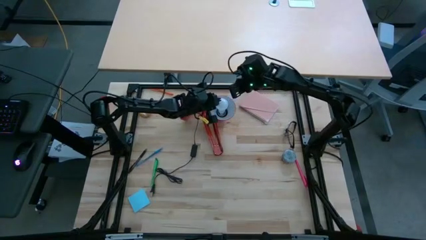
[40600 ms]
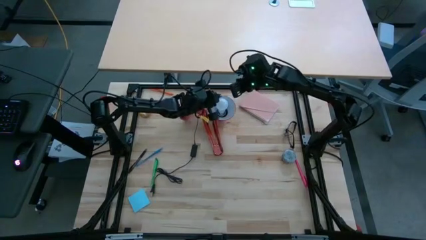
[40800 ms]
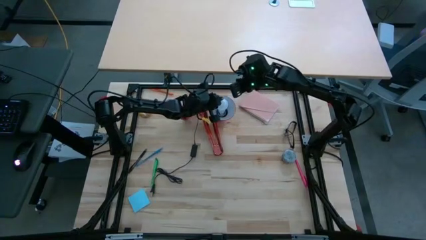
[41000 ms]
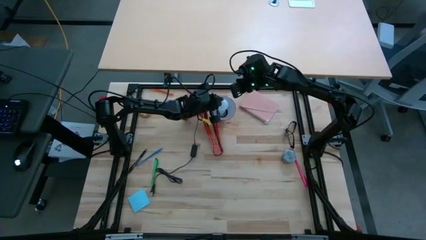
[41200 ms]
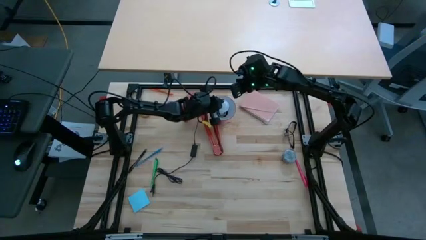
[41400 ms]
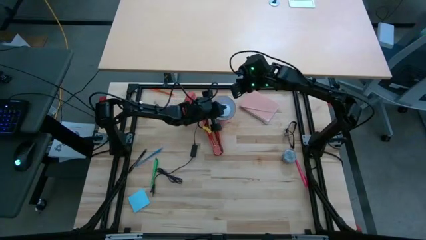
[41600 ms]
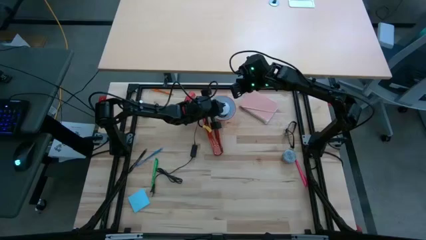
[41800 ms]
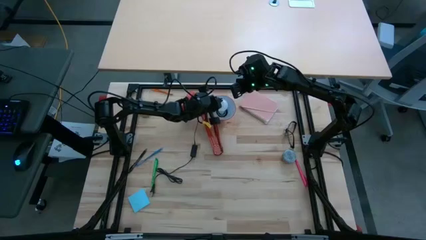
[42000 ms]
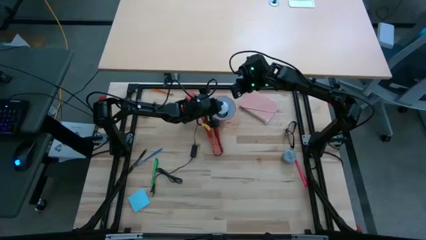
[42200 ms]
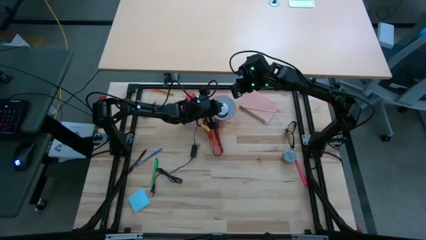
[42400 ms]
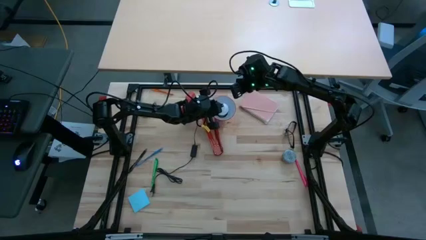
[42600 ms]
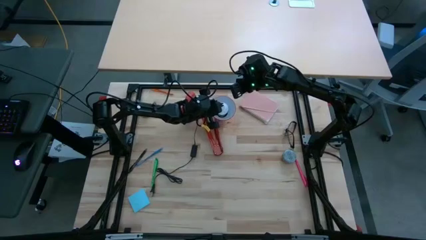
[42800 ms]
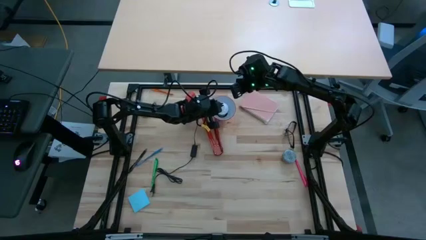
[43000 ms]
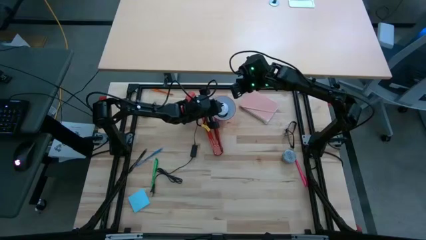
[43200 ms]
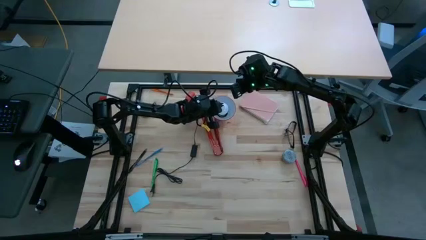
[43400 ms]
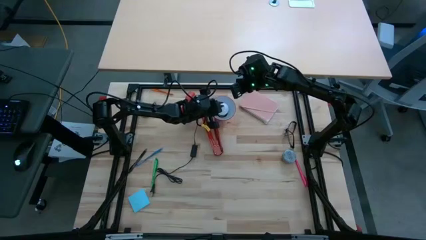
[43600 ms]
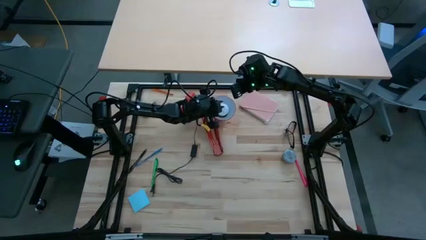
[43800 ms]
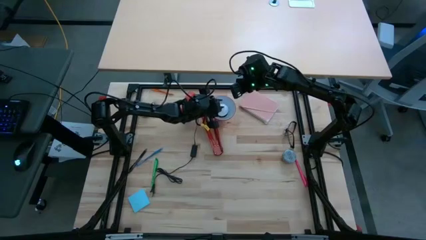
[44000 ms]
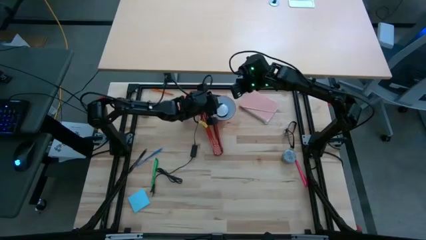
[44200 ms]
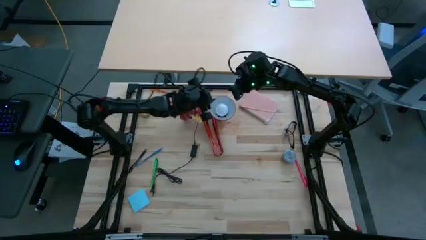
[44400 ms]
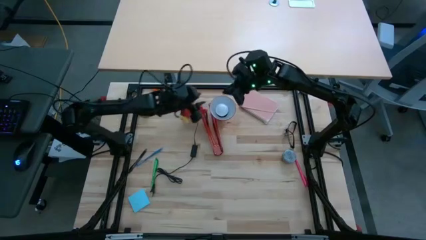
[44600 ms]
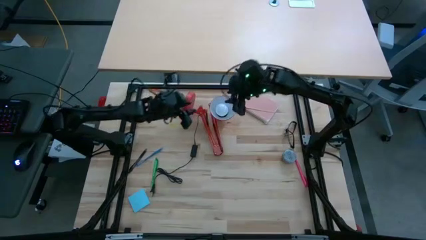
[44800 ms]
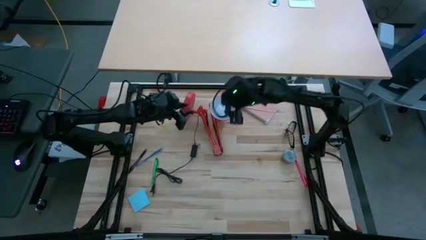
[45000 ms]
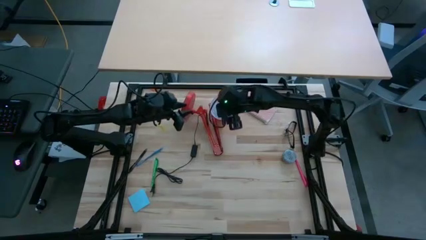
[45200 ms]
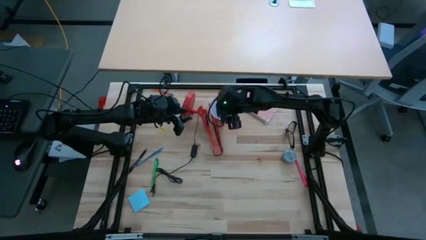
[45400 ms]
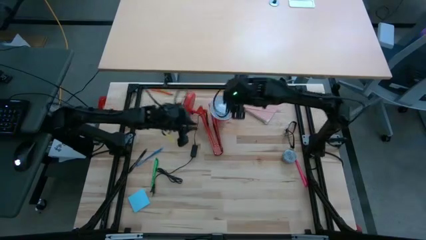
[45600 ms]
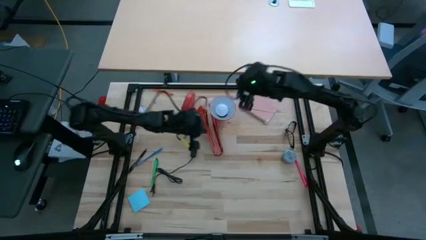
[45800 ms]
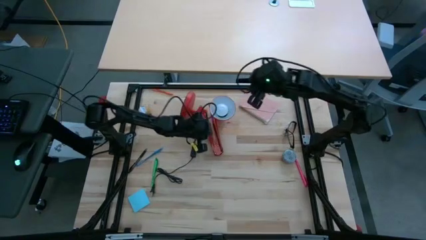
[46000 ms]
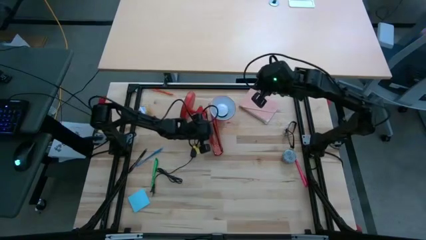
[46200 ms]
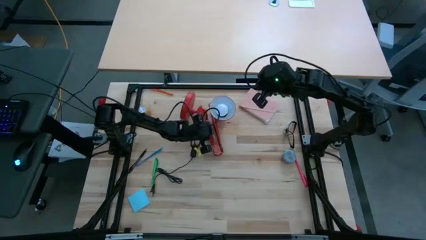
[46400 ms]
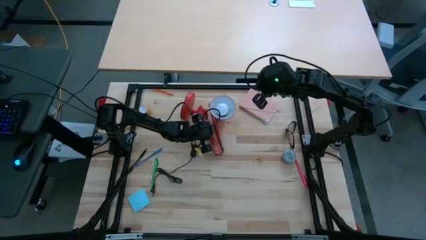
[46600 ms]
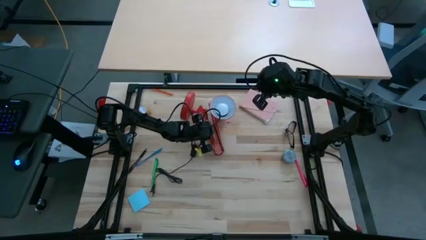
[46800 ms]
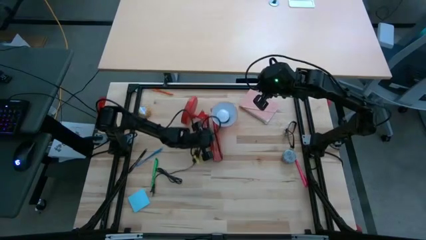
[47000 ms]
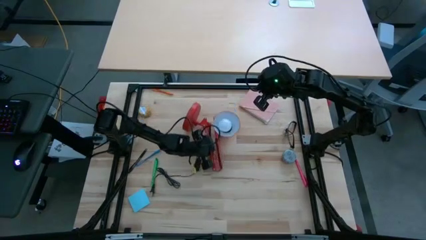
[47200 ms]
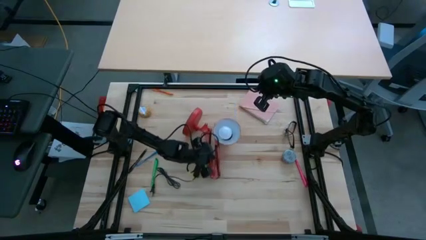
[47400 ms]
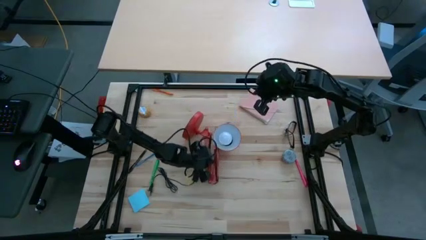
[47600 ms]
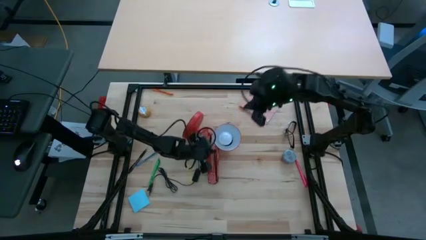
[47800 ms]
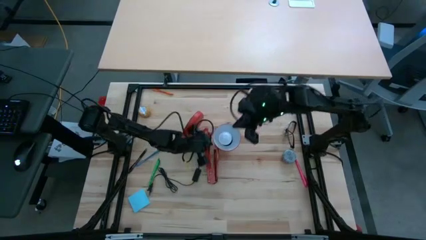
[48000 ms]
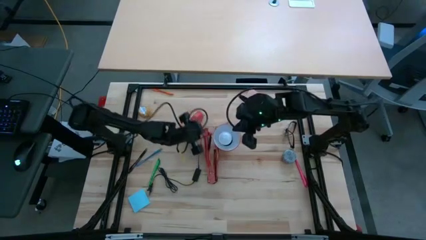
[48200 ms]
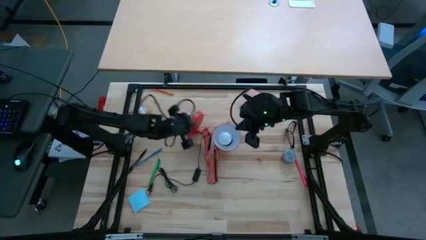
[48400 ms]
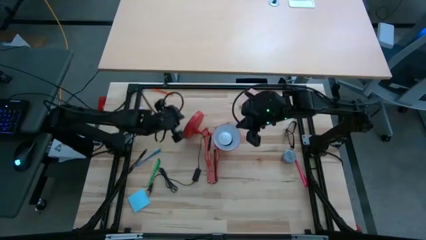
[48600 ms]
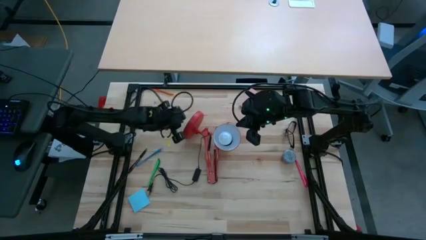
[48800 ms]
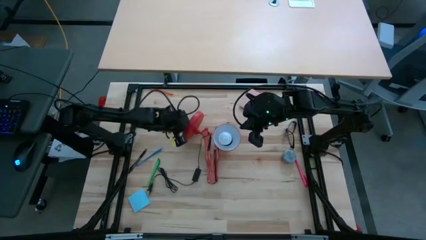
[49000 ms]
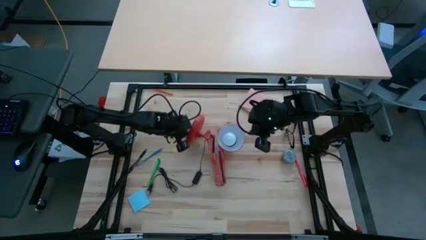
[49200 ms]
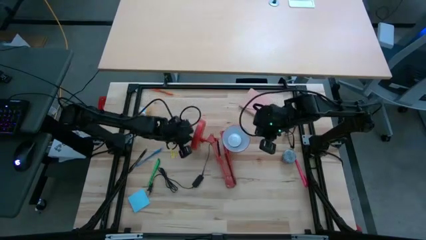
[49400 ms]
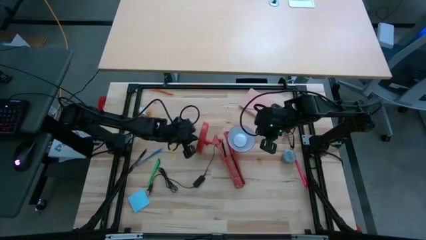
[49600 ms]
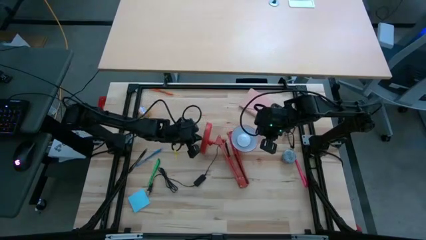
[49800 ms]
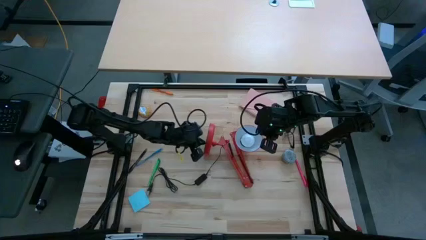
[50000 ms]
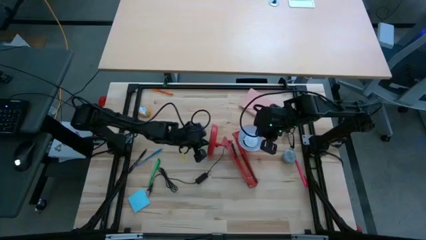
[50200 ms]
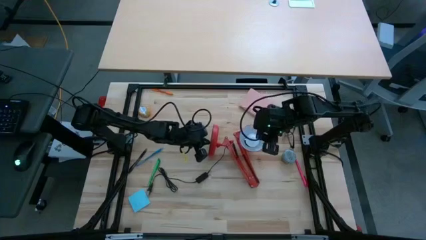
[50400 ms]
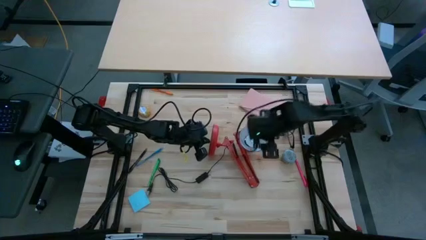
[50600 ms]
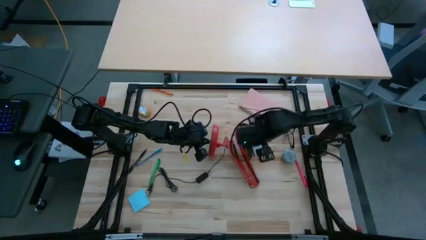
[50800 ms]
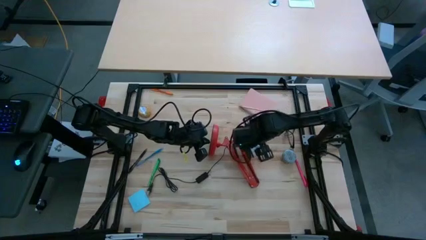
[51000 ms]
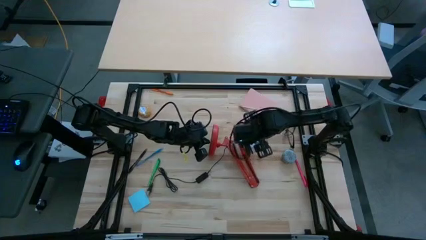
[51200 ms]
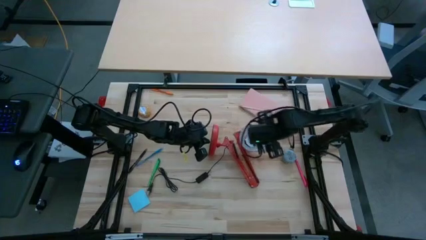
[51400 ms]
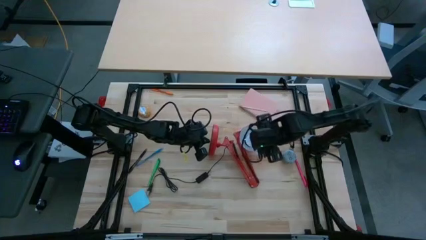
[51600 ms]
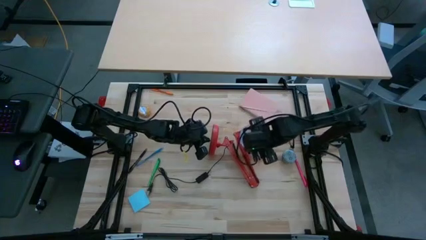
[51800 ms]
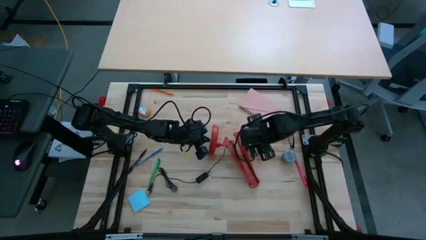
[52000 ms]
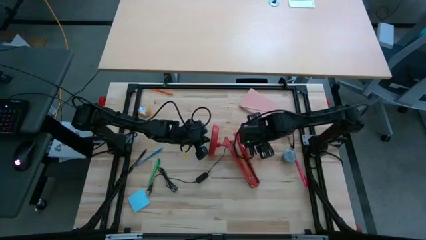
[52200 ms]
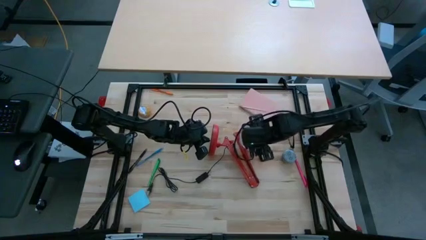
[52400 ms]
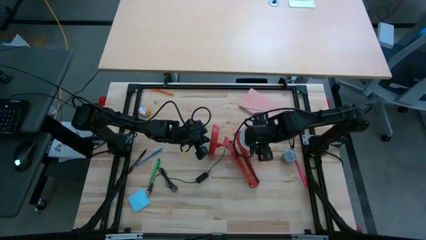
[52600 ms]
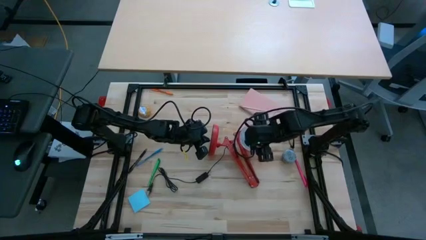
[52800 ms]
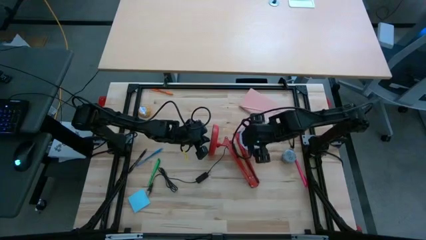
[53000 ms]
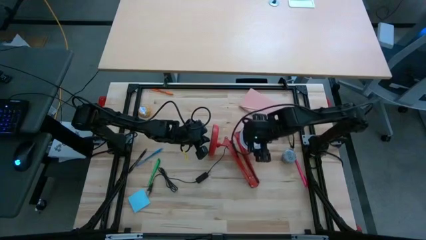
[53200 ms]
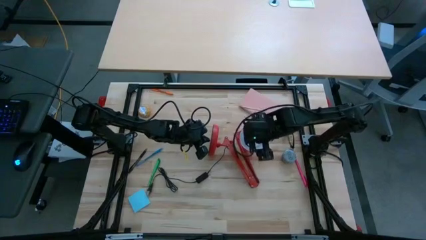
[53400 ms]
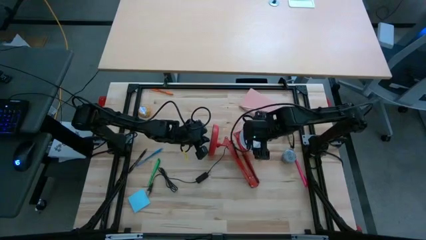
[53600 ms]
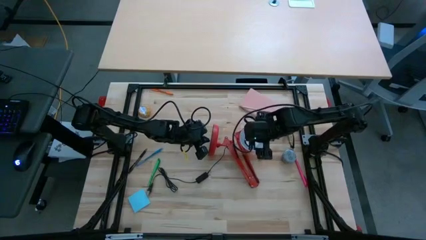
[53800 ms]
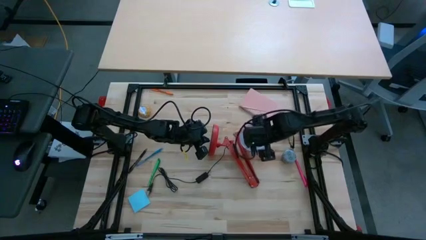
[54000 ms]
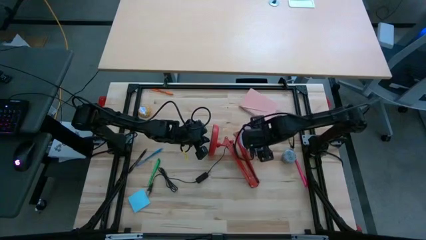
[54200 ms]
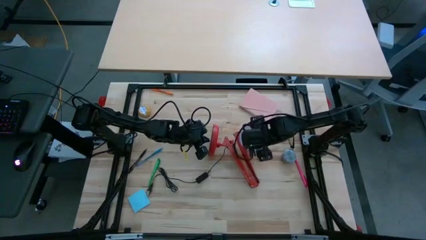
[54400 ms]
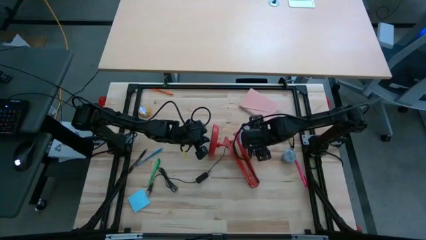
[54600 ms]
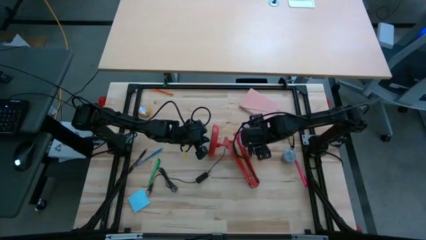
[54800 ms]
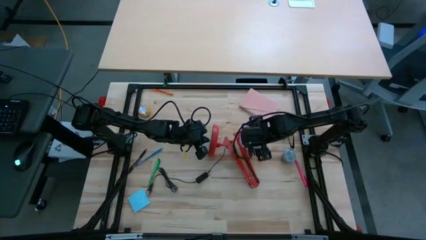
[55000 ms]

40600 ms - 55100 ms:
Task: Screw lightbulb
Insert the white lightbulb into the red lamp
